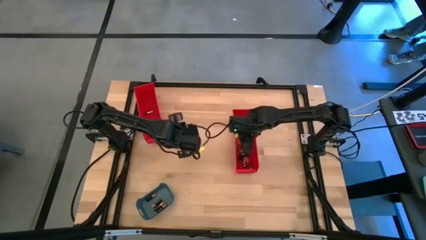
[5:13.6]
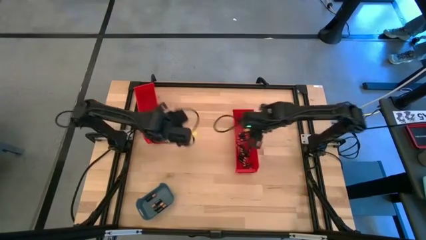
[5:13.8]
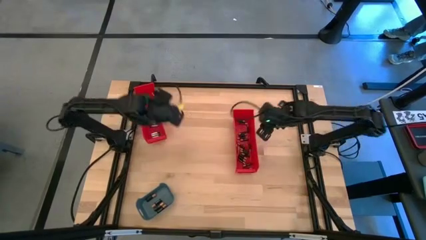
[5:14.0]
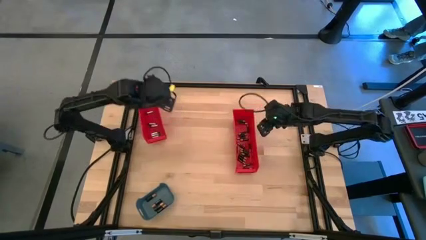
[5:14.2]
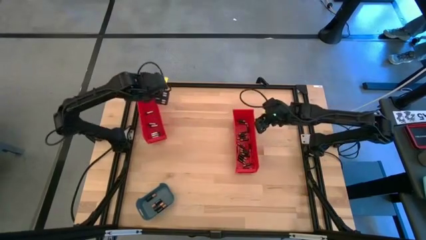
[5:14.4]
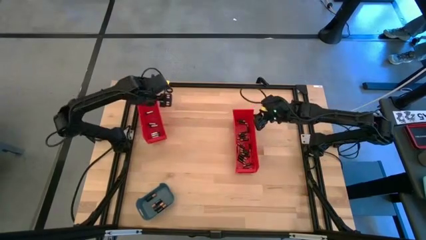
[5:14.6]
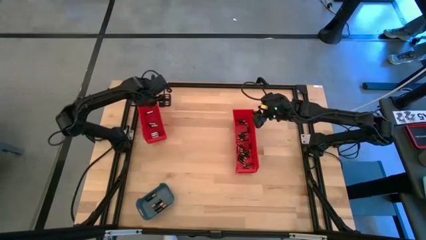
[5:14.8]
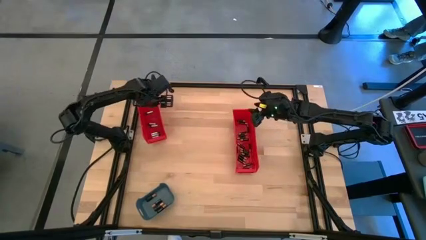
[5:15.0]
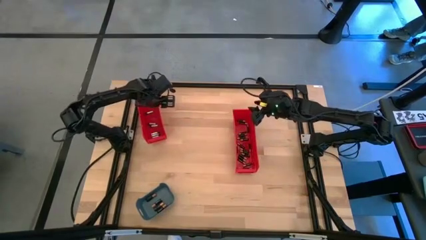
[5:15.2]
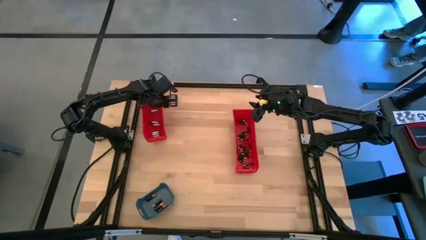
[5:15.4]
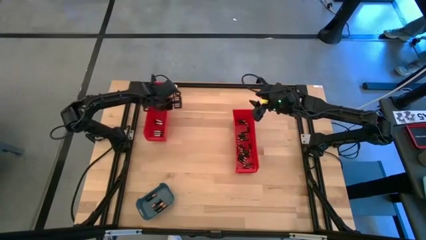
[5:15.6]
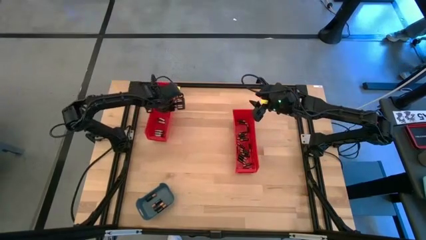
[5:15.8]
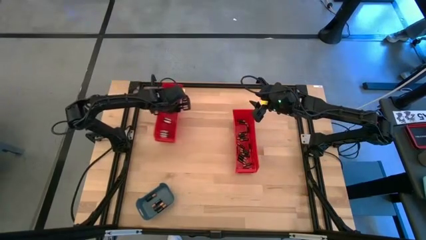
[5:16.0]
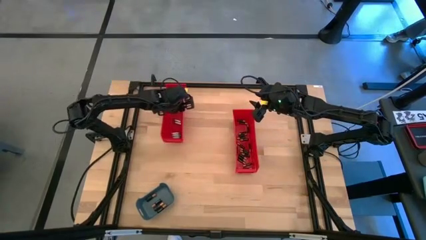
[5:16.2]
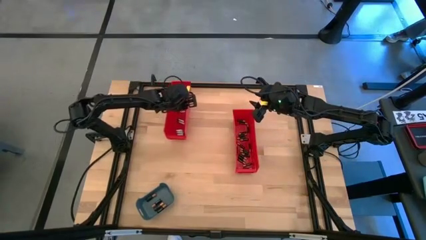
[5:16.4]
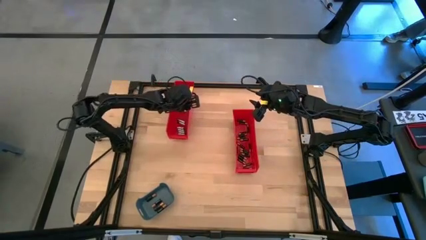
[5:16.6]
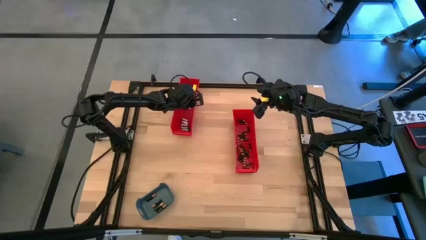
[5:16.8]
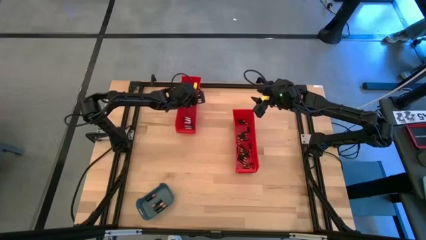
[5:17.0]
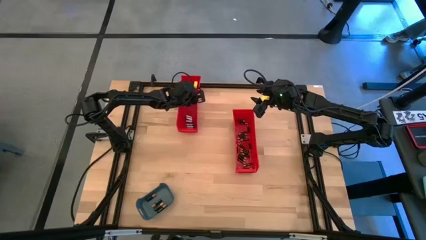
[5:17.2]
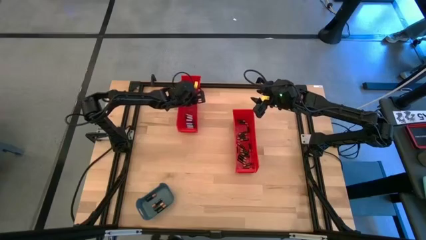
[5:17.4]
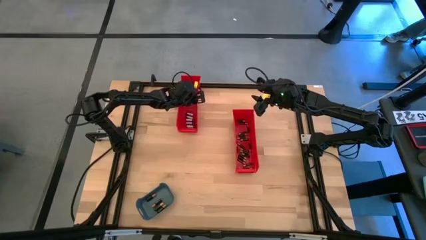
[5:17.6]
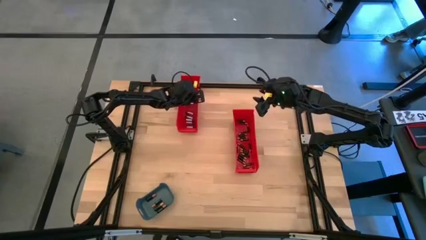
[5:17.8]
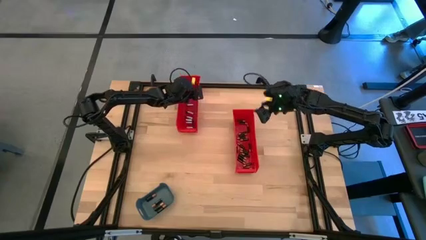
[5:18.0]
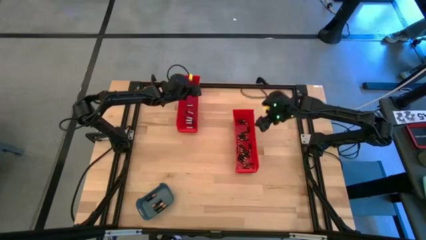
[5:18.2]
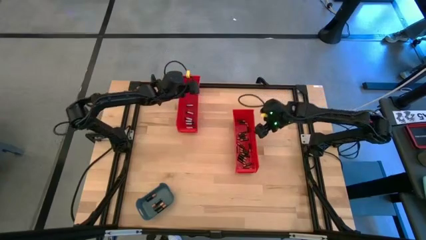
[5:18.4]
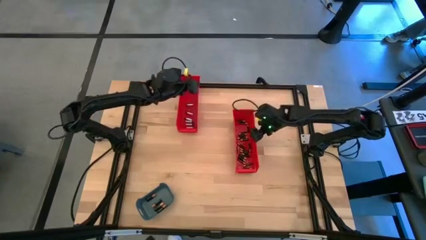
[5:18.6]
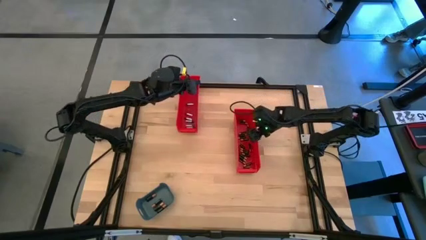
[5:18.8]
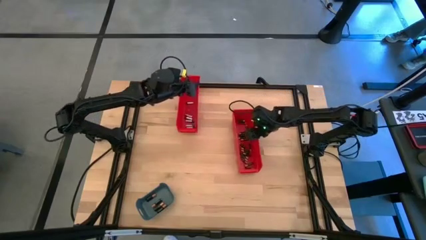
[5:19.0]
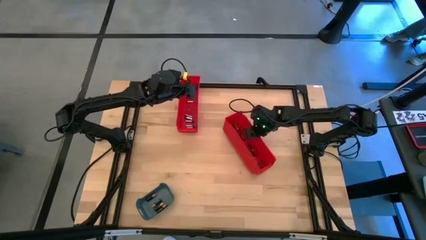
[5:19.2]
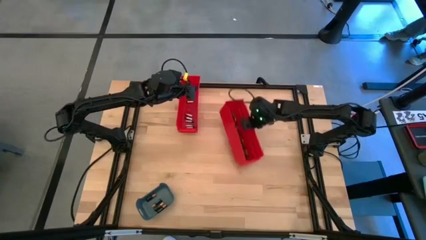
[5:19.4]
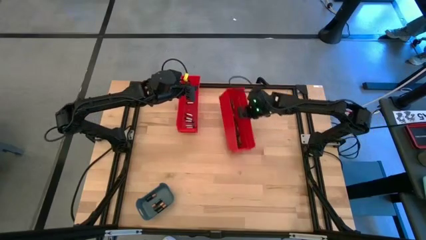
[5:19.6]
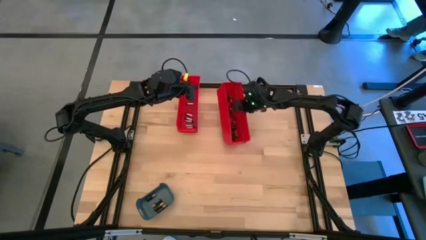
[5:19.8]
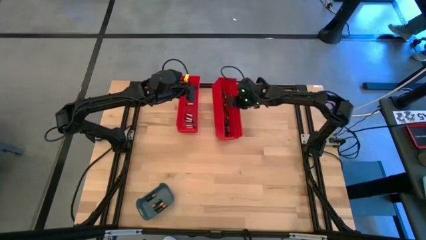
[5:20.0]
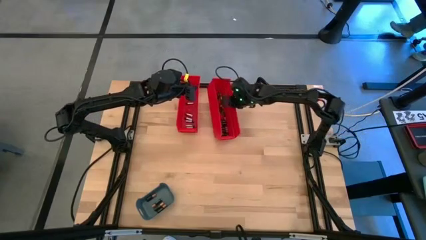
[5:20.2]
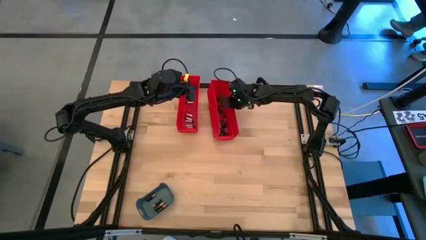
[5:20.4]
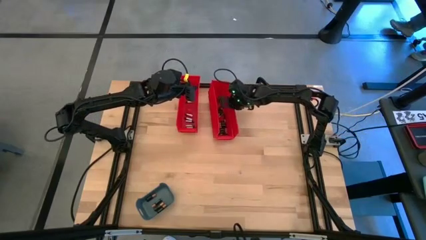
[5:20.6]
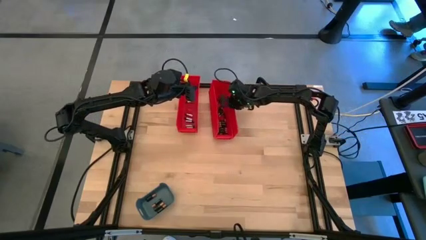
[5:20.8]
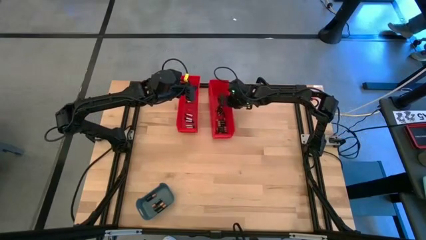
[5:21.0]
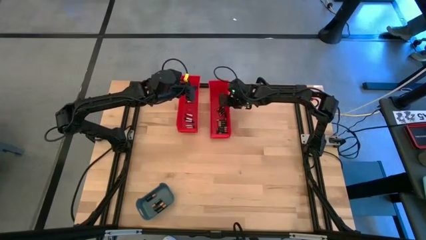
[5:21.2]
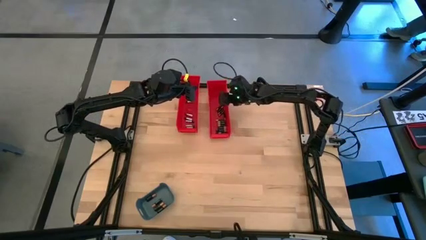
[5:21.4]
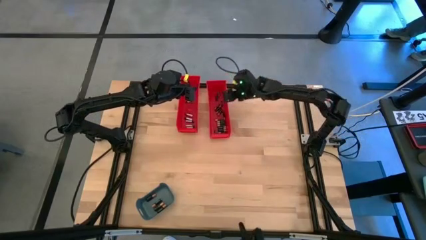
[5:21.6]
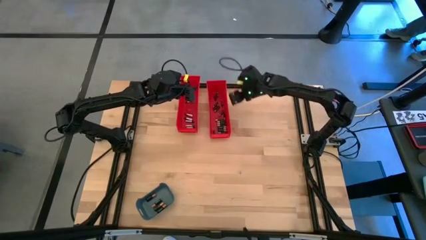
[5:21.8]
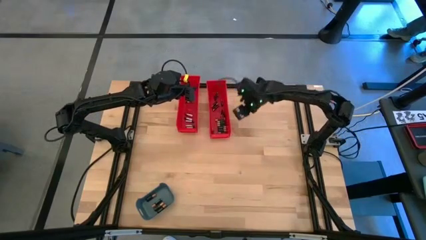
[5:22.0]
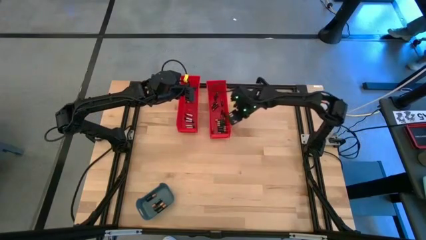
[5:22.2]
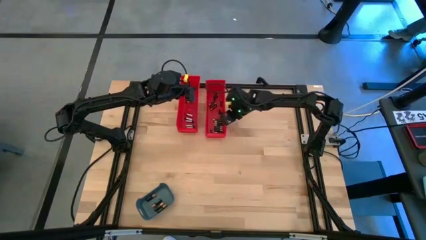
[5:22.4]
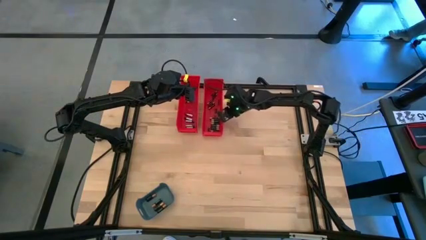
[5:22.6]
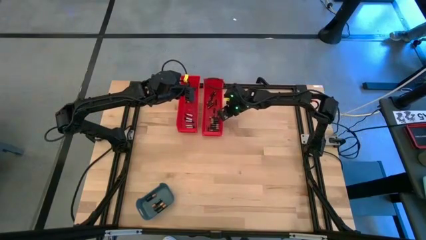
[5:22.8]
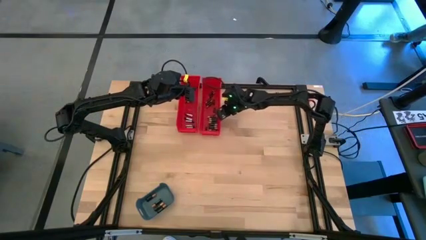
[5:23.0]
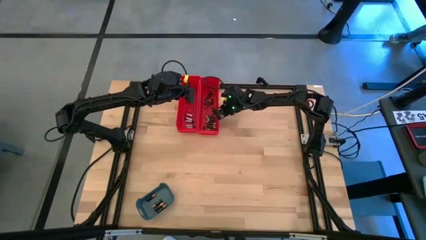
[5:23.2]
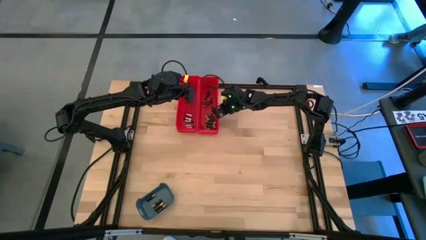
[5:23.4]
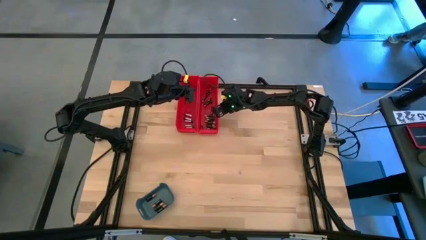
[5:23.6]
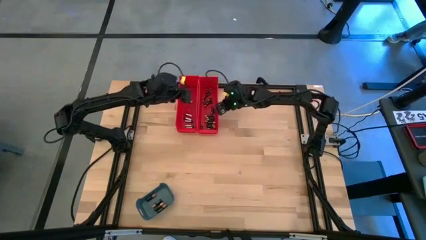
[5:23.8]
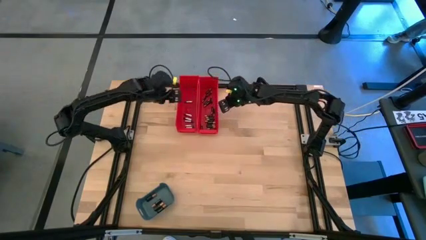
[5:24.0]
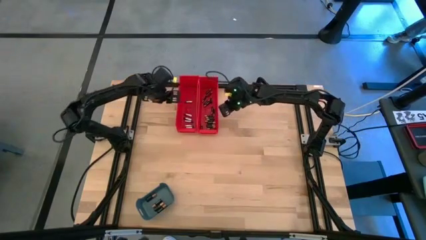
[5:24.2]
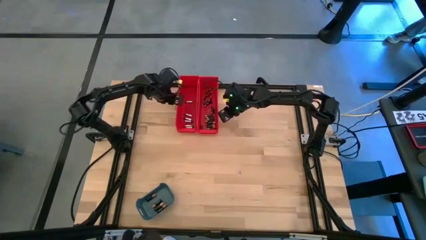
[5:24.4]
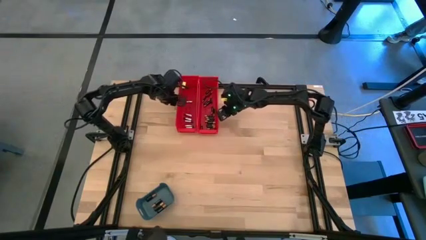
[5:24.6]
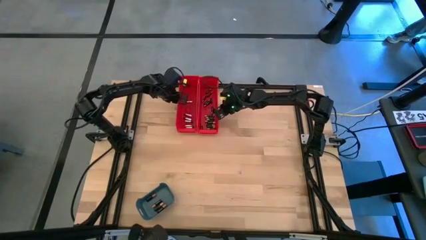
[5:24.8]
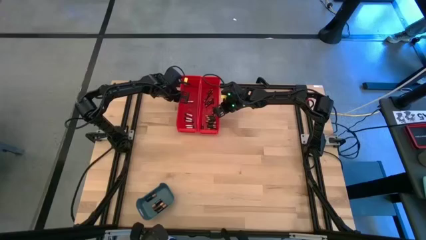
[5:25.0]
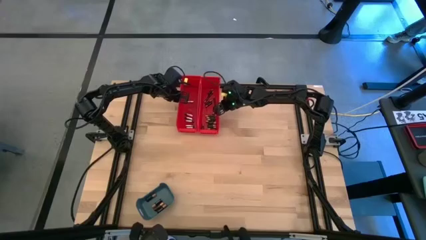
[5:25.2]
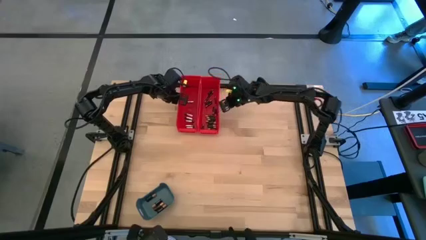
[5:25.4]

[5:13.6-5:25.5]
Task: Sort batteries
Move the bins to the top center of the table
